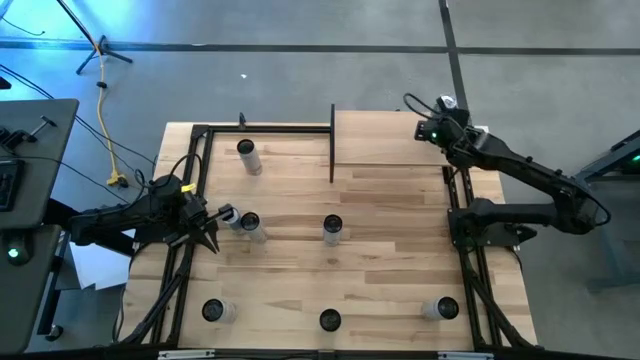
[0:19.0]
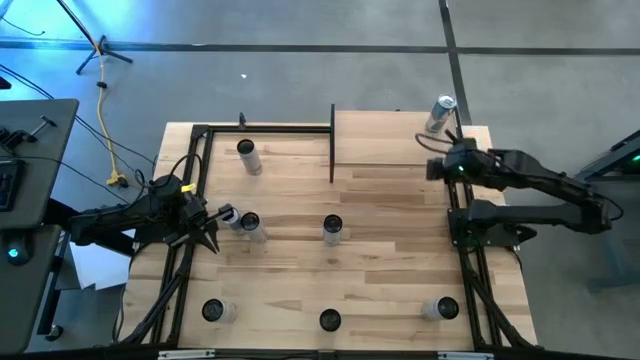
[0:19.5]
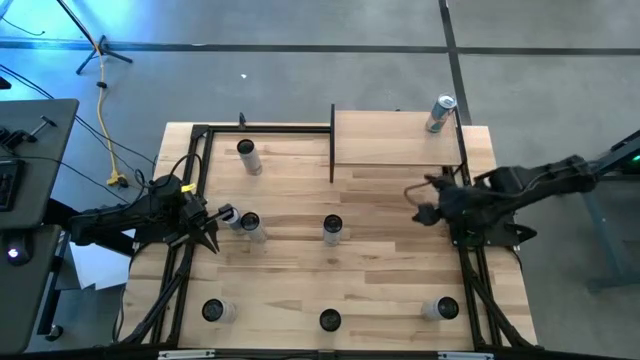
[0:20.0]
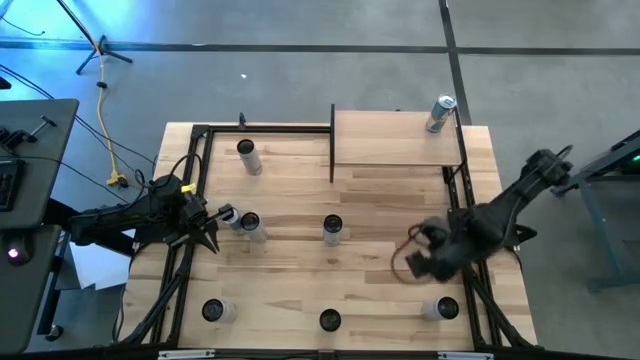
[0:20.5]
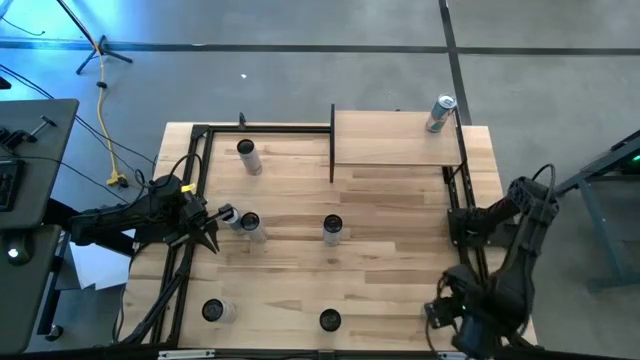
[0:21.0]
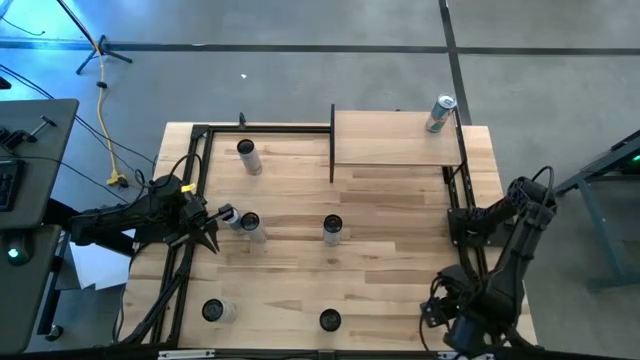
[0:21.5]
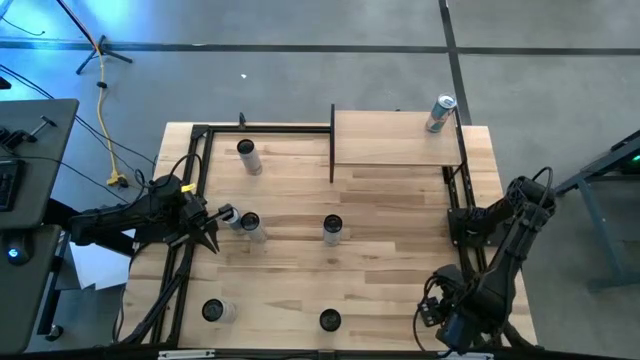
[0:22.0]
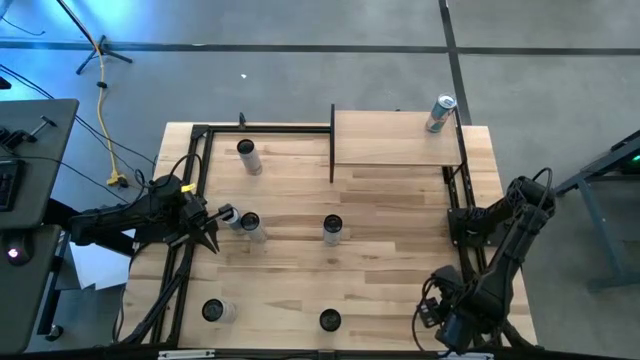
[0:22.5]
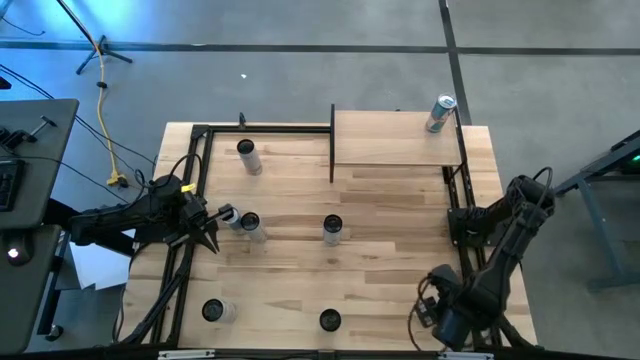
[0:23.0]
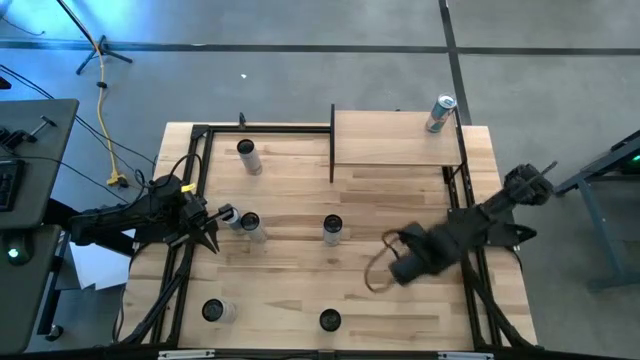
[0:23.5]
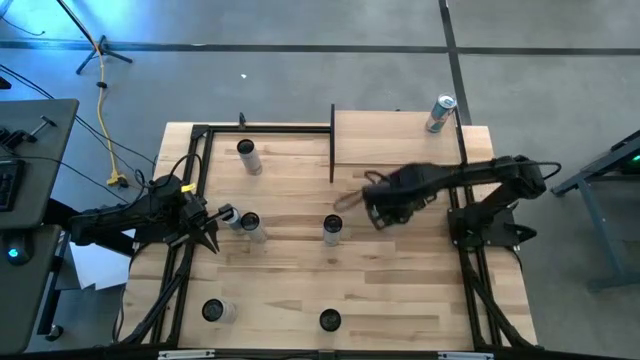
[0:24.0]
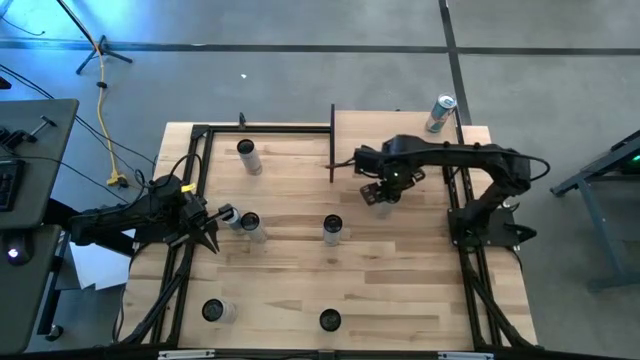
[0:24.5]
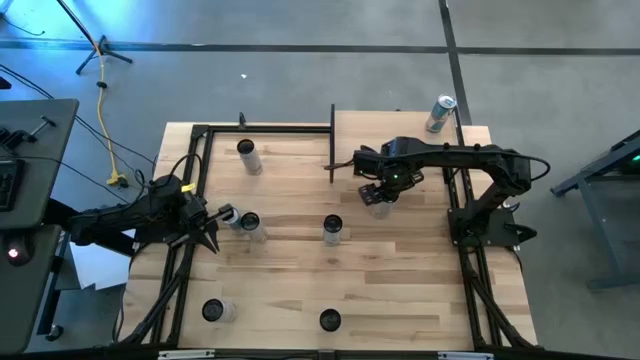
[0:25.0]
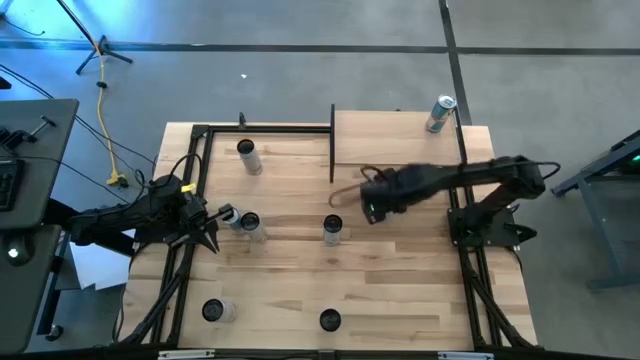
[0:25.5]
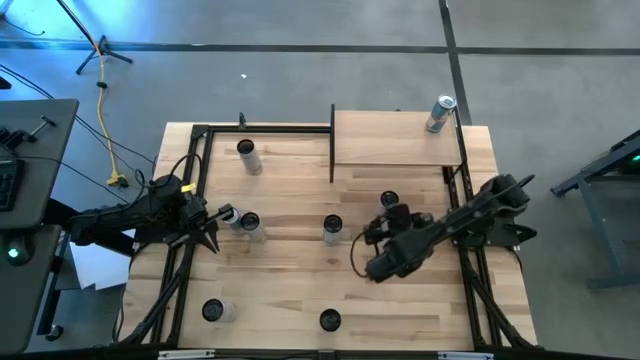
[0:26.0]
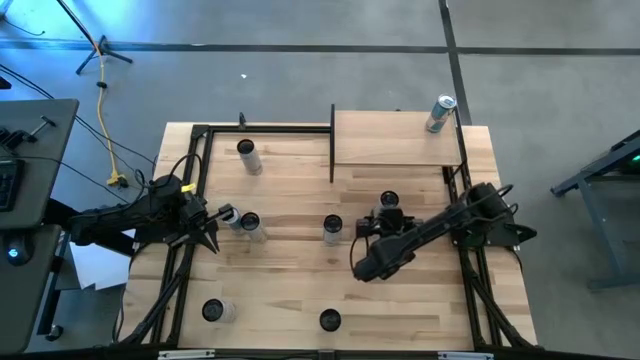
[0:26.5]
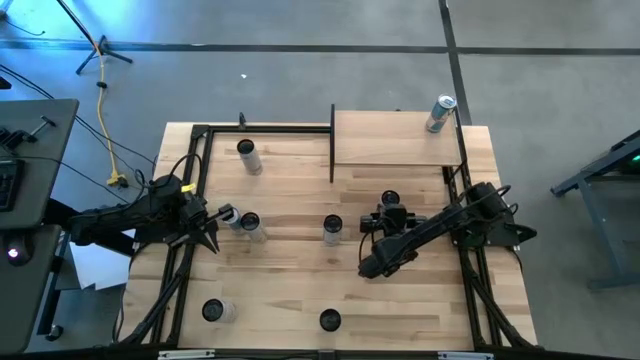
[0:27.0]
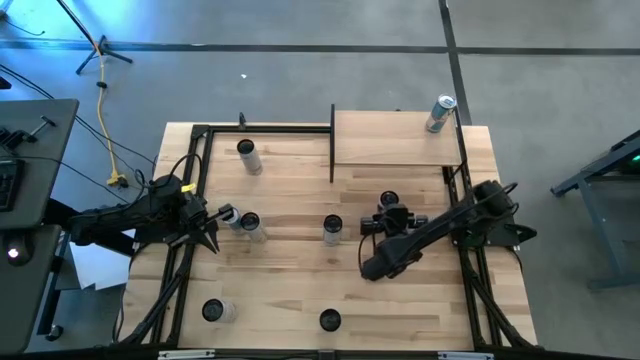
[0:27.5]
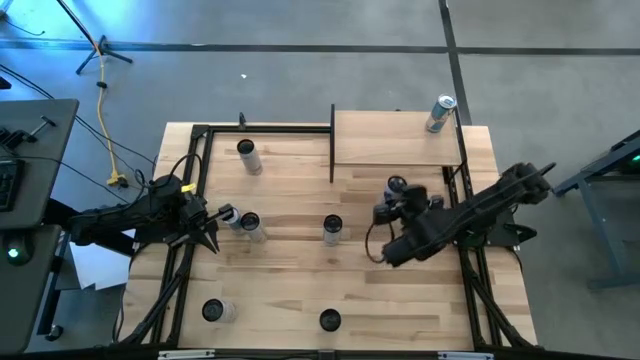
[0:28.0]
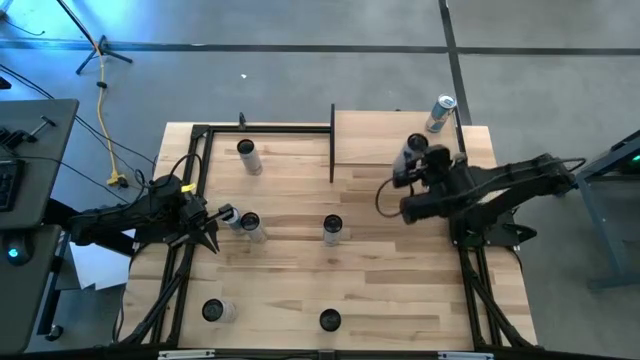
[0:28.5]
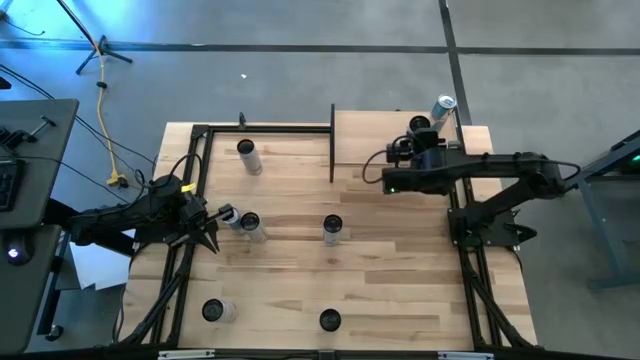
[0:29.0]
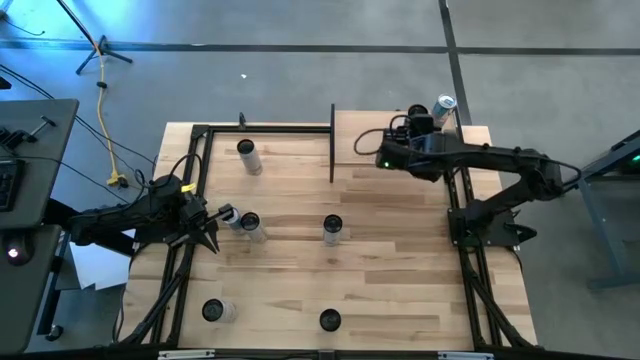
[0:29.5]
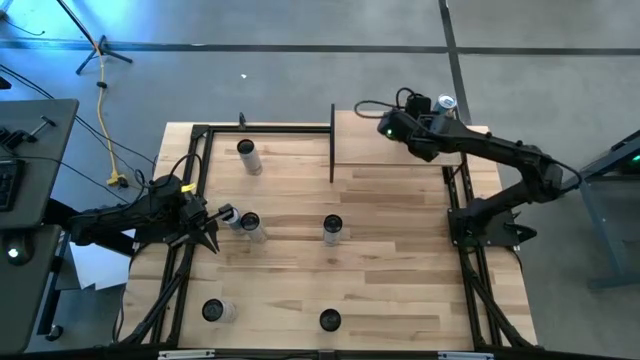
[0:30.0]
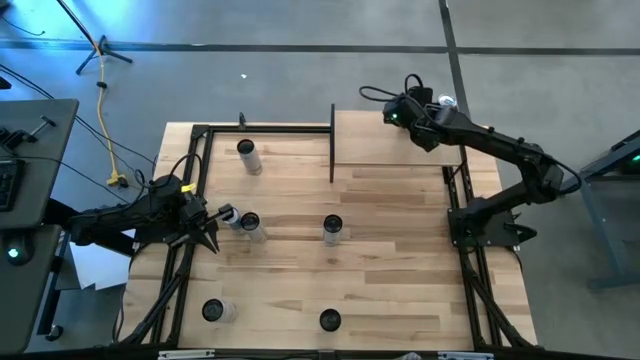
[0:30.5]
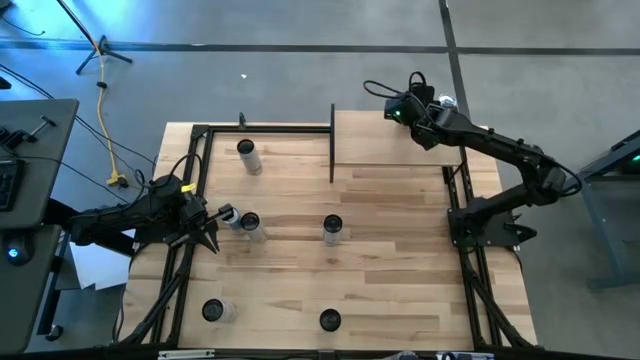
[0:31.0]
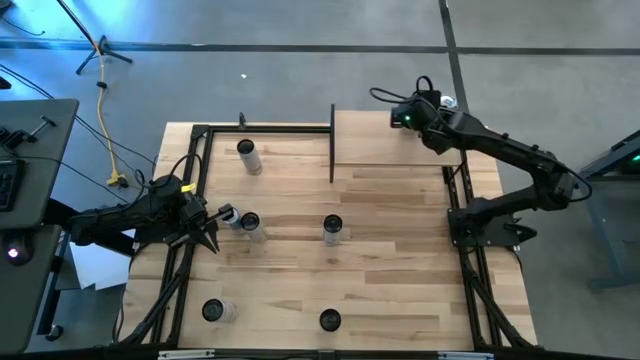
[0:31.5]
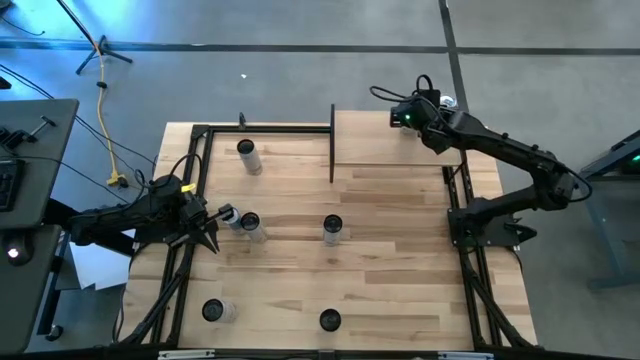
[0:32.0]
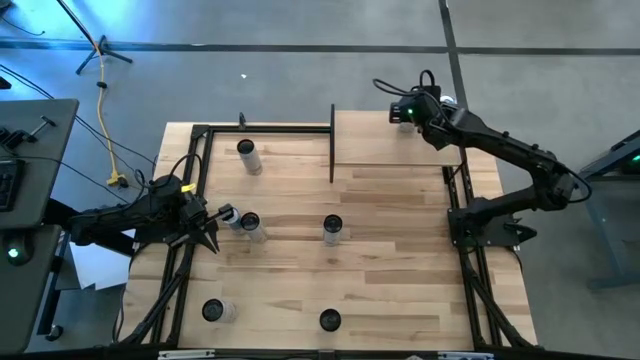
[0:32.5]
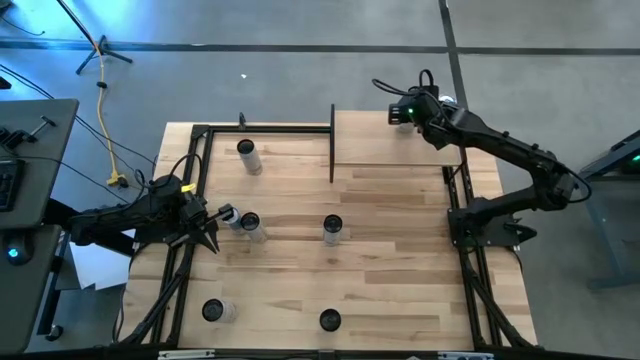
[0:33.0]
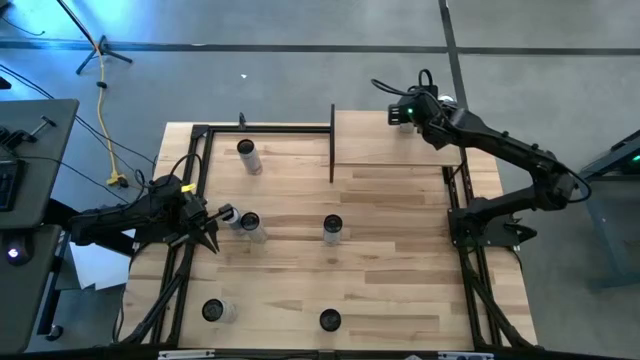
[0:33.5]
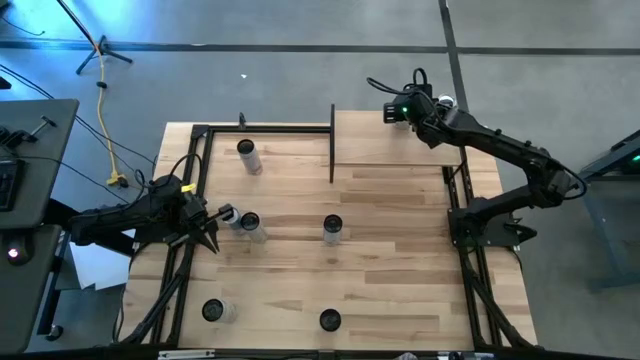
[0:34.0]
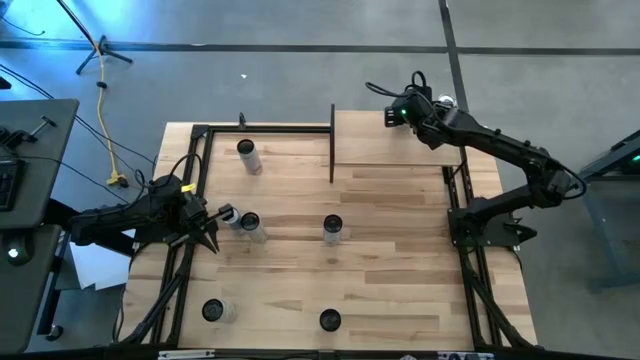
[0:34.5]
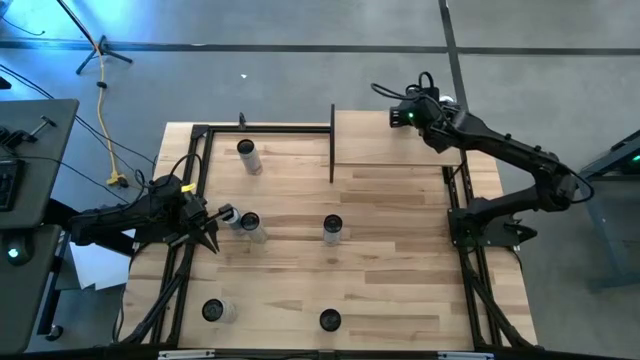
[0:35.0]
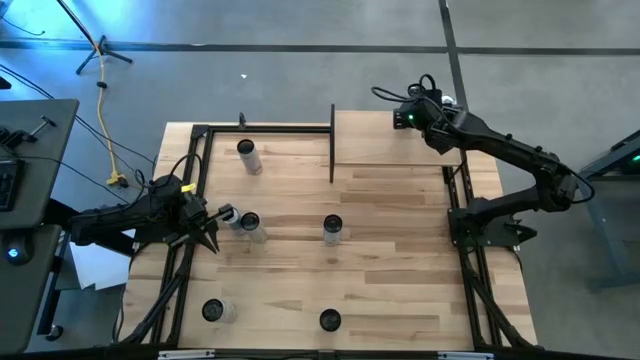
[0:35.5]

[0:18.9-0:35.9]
Task: Place canned beverage on shelf
Put the bottom white yellow soda can on the shelf

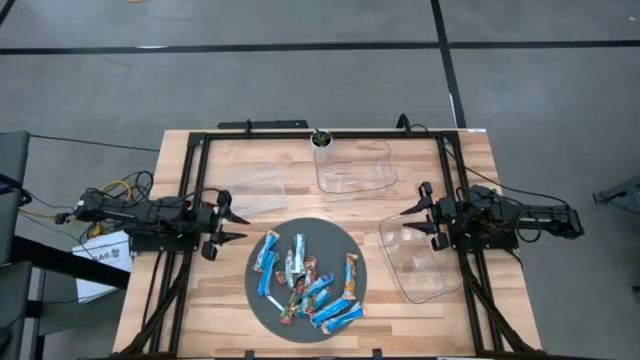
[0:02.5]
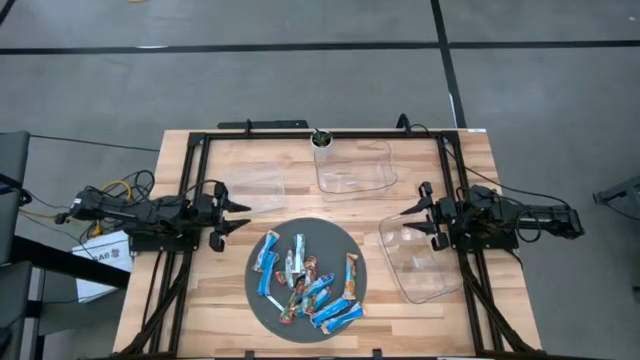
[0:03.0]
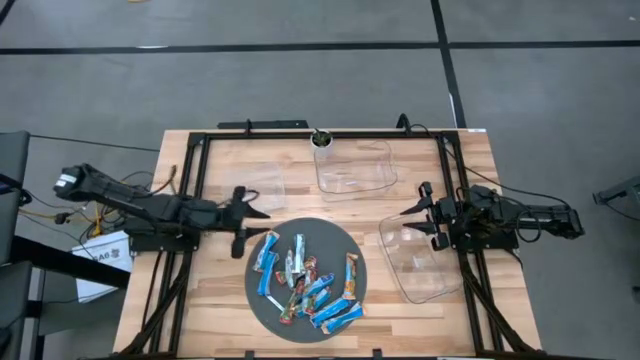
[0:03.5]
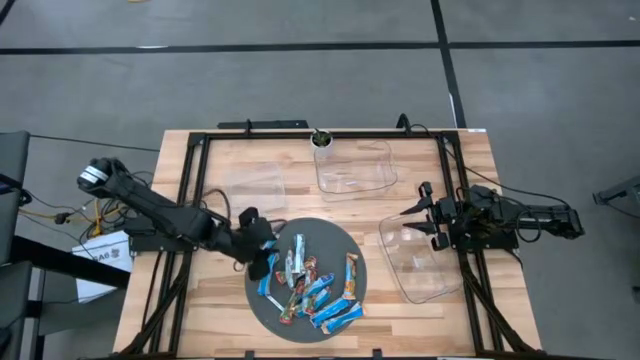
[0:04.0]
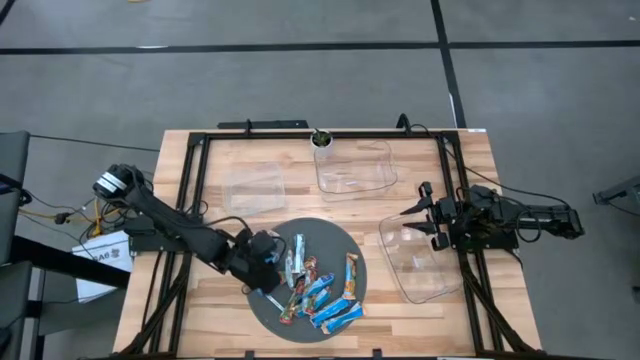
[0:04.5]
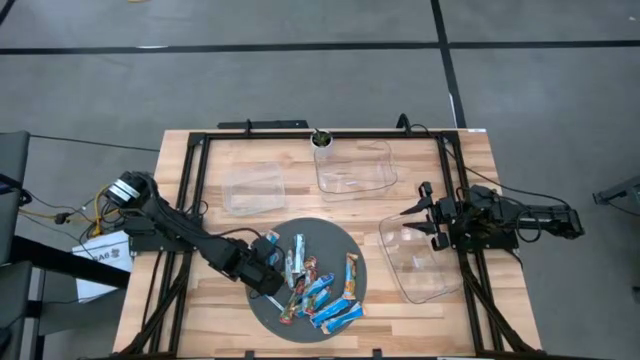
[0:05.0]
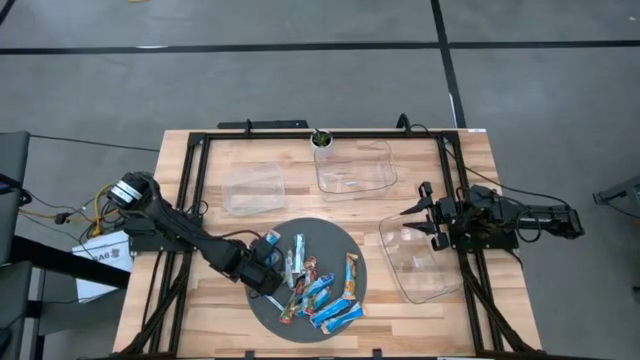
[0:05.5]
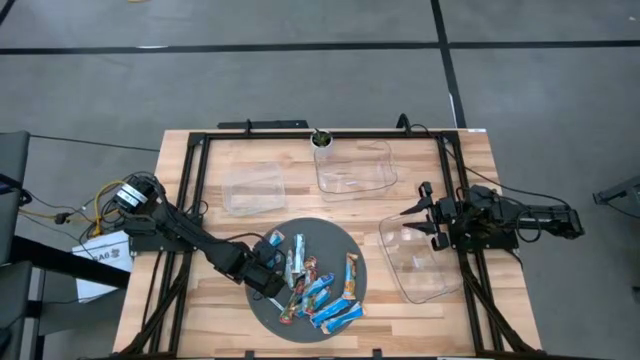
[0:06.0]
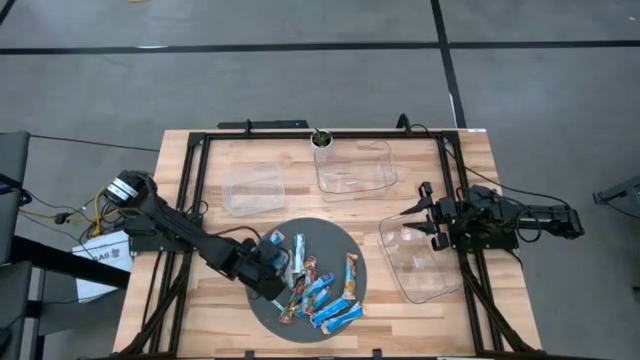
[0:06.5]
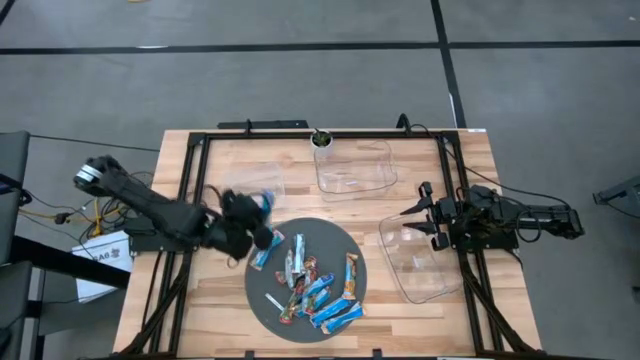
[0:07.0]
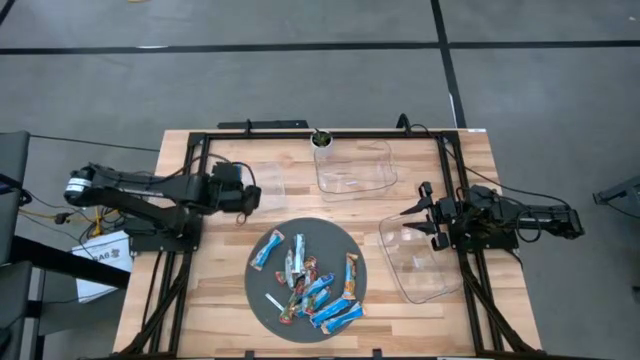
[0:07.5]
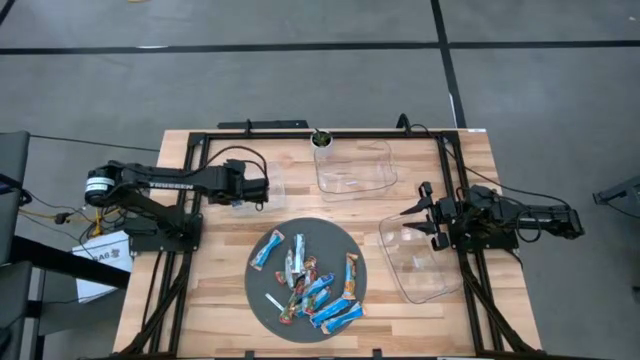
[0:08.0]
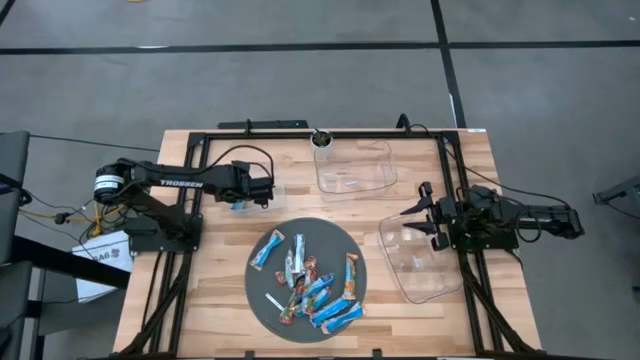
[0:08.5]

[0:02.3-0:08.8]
Task: Pick and place Granola Bars by type
Put the blue granola bar into the white bin
